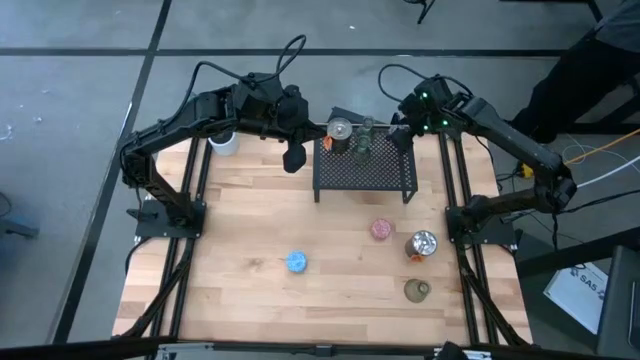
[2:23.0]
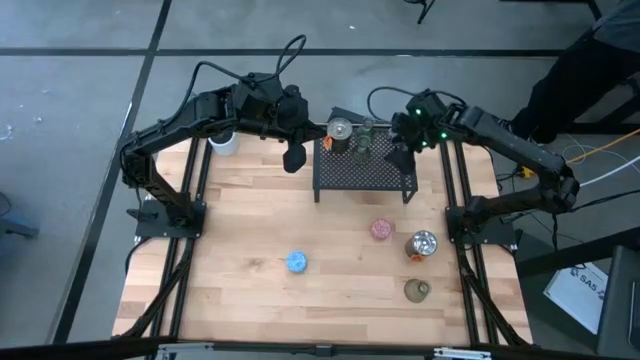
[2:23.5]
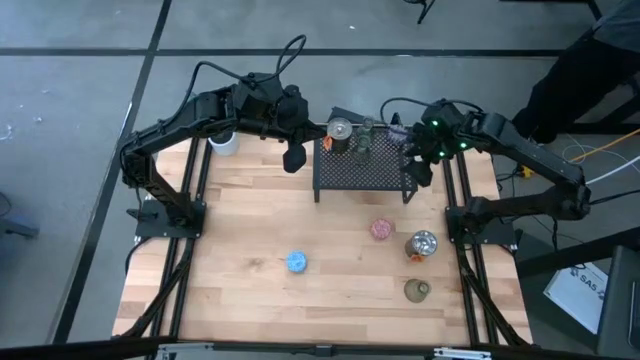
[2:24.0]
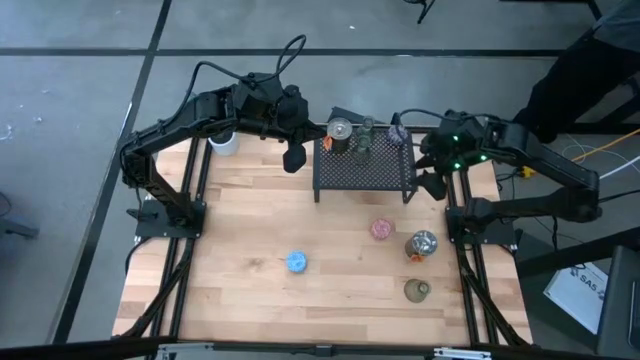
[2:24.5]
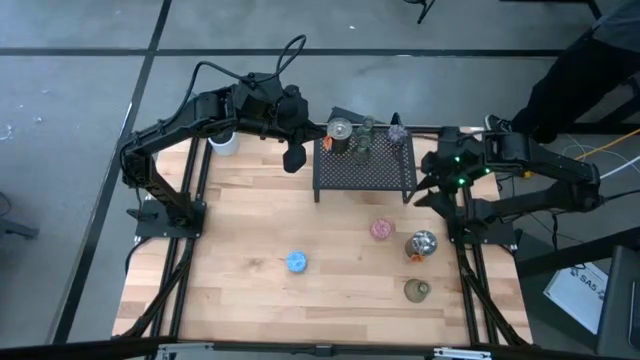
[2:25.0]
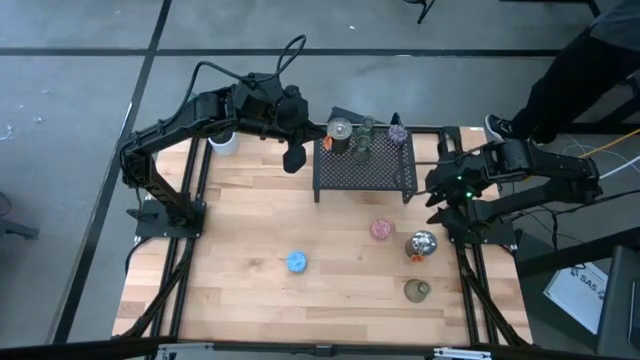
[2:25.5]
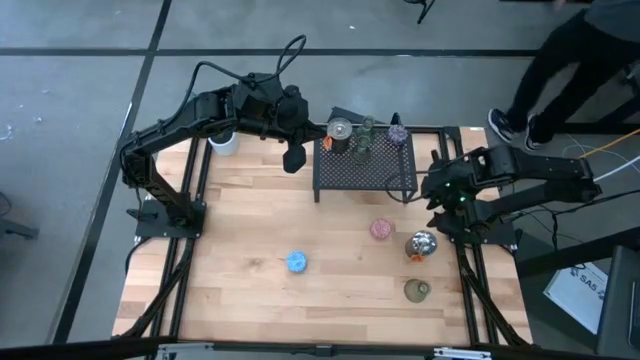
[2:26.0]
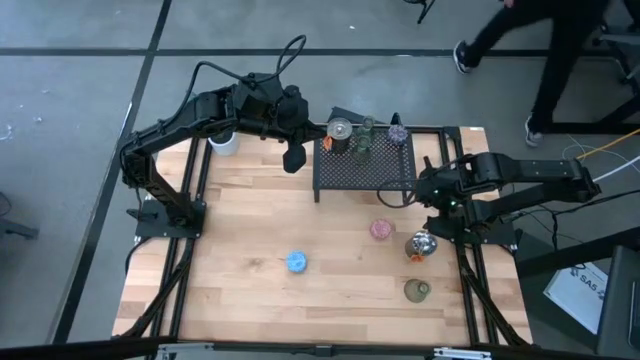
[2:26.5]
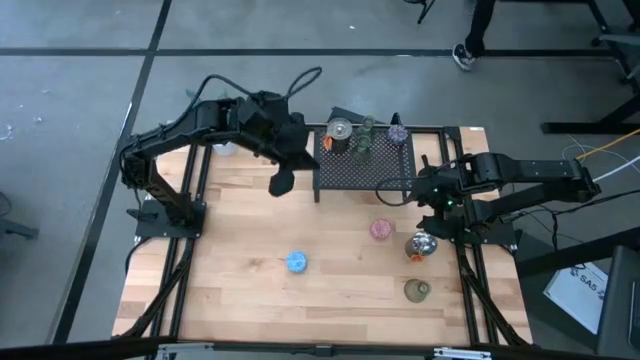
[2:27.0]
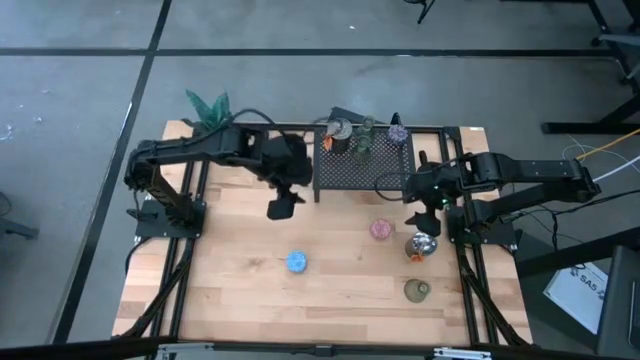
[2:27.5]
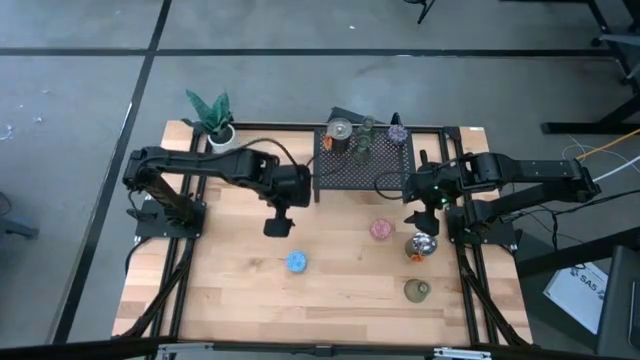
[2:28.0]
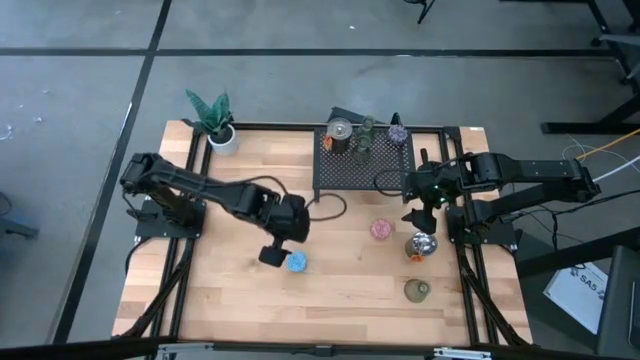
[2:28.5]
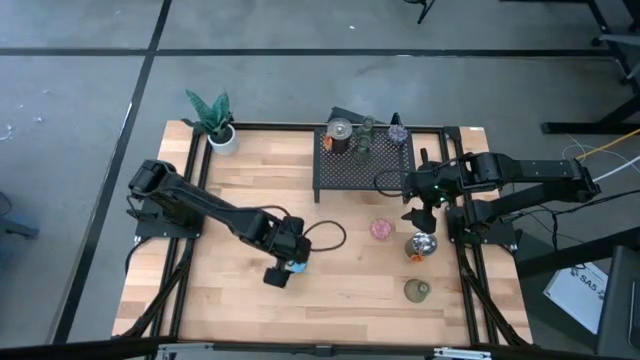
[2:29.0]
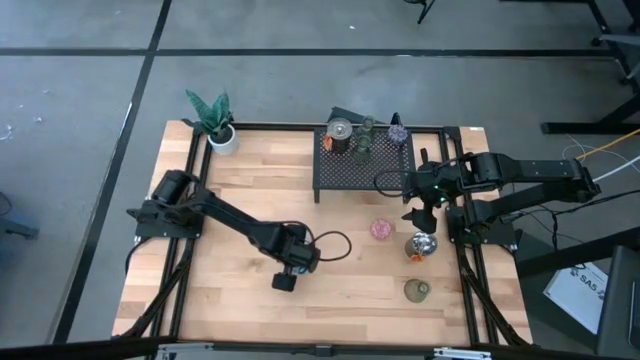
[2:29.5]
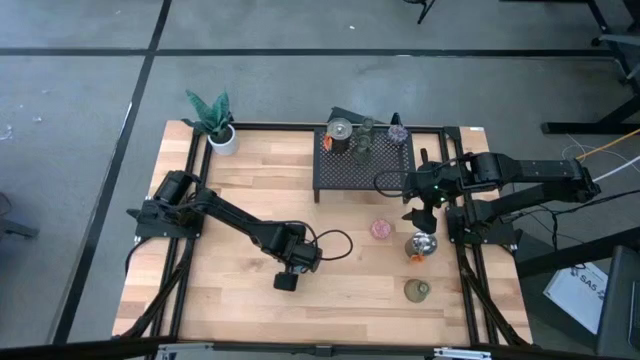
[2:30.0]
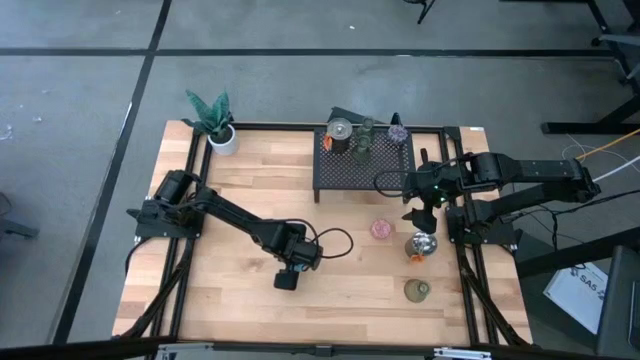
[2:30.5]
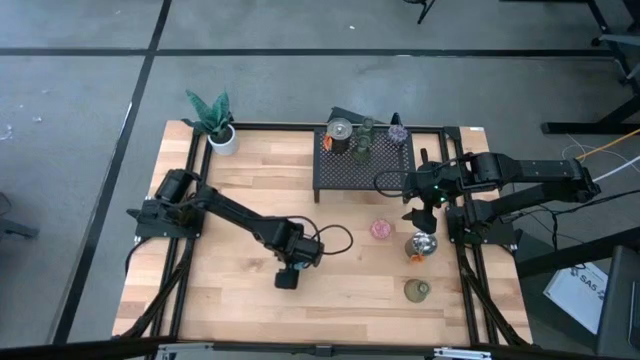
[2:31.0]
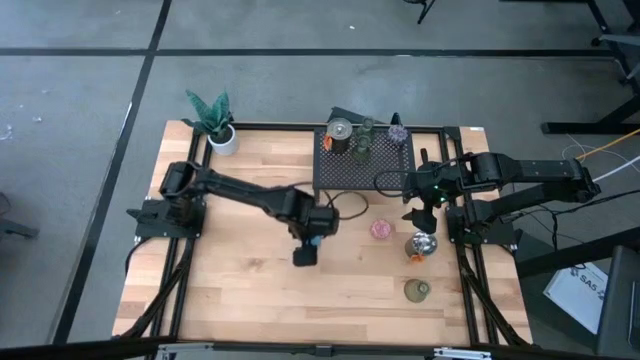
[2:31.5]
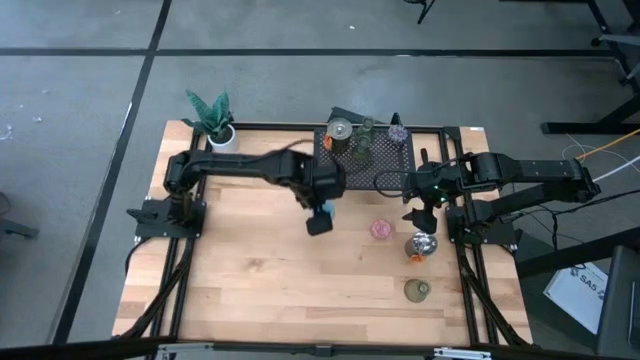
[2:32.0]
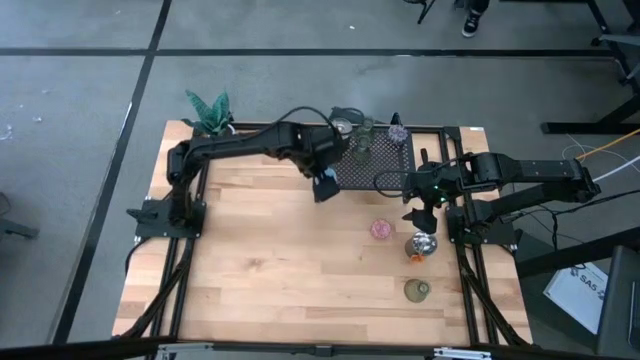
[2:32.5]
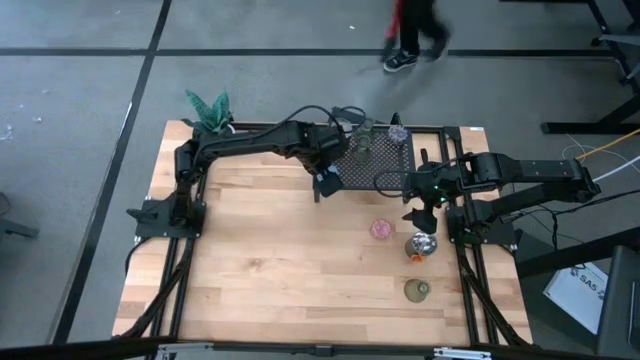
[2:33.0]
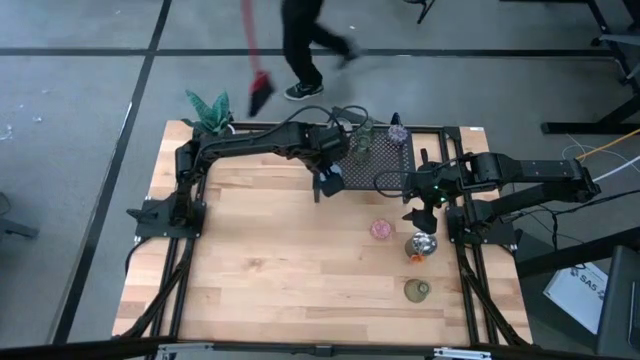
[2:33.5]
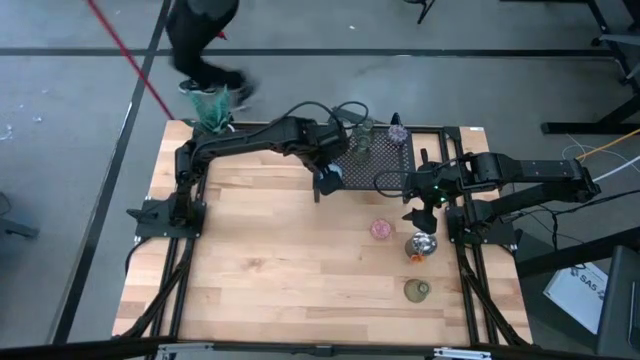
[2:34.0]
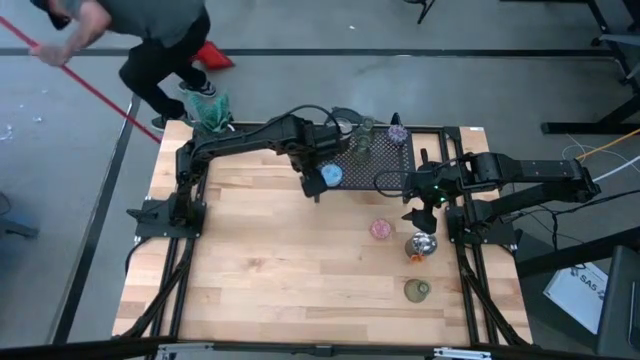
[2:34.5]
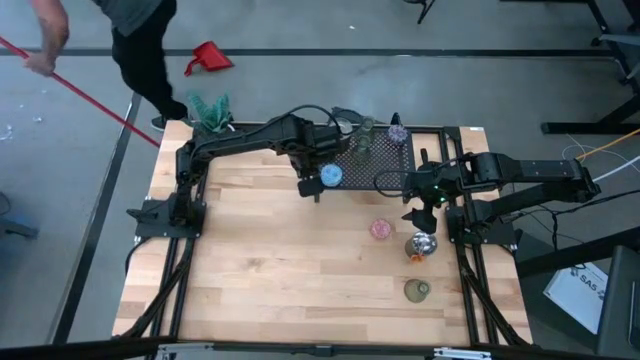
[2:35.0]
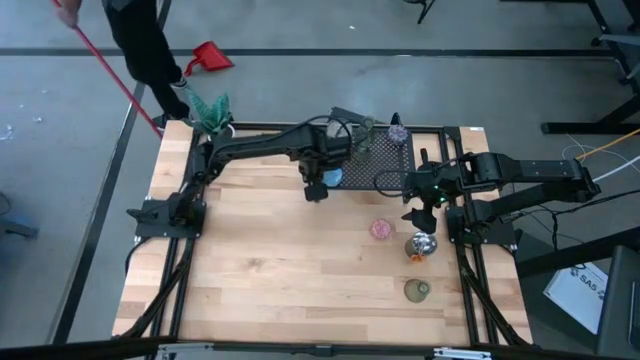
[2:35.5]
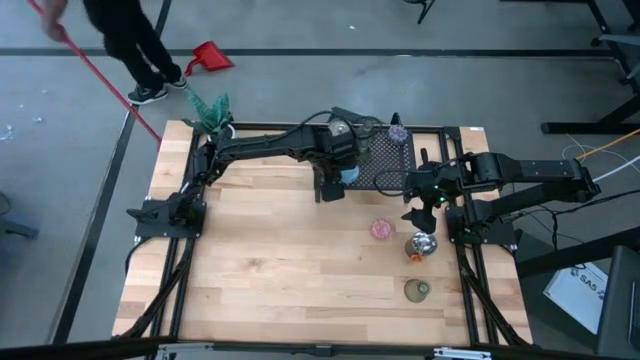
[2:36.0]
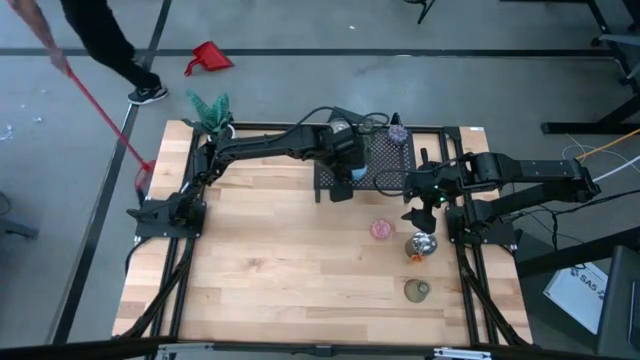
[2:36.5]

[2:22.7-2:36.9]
Task: Pick & Place candle stick holders
Put the blue scented candle on the shelf align with the red scented candle

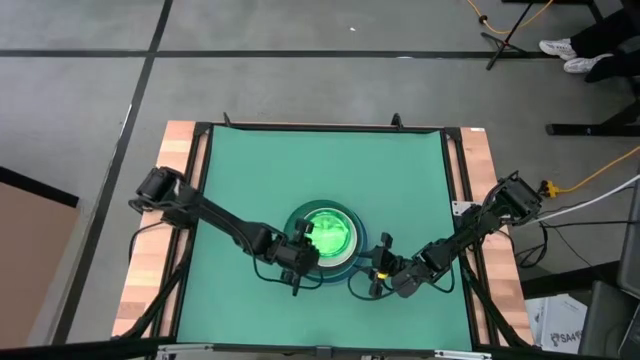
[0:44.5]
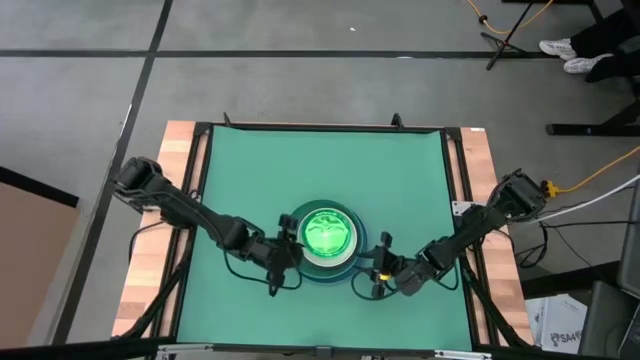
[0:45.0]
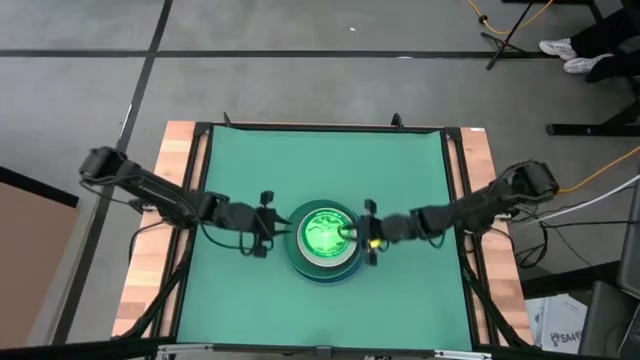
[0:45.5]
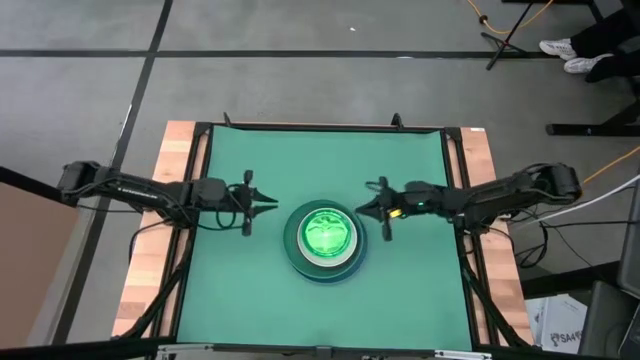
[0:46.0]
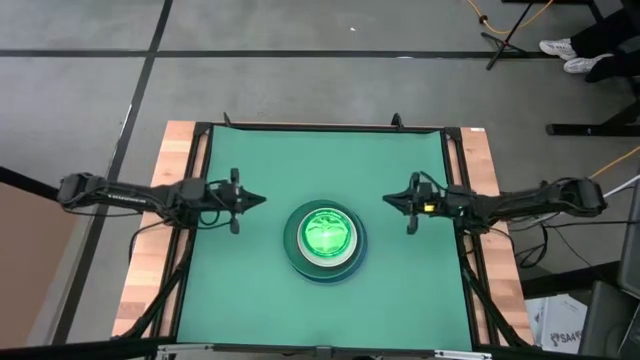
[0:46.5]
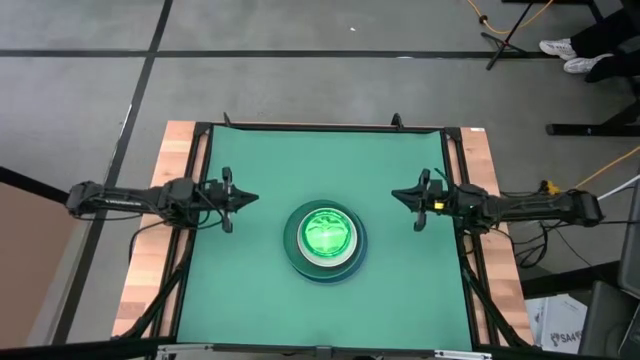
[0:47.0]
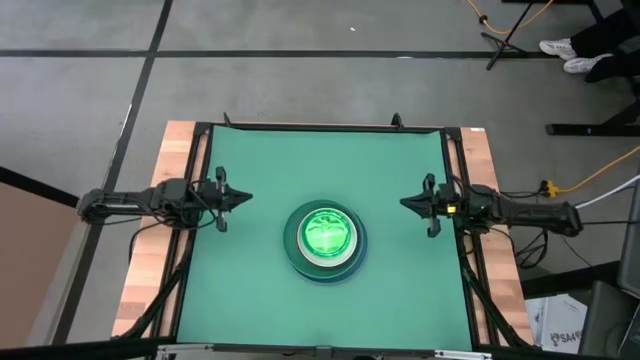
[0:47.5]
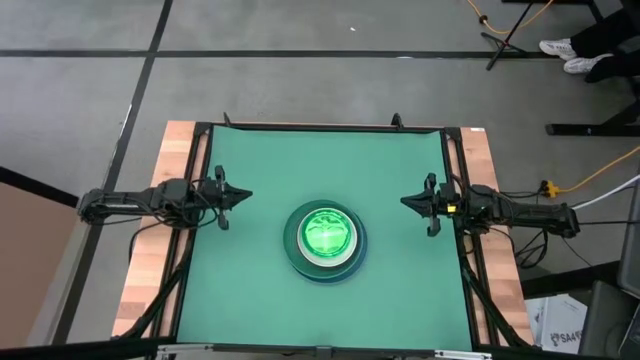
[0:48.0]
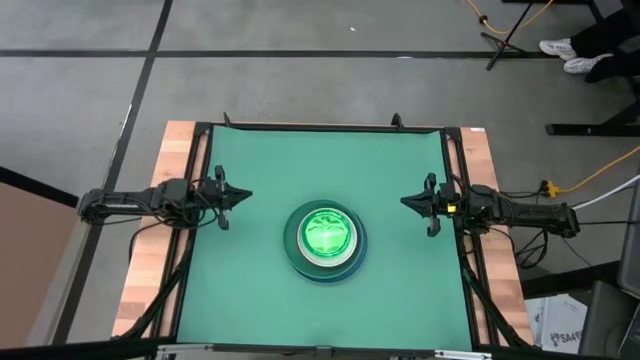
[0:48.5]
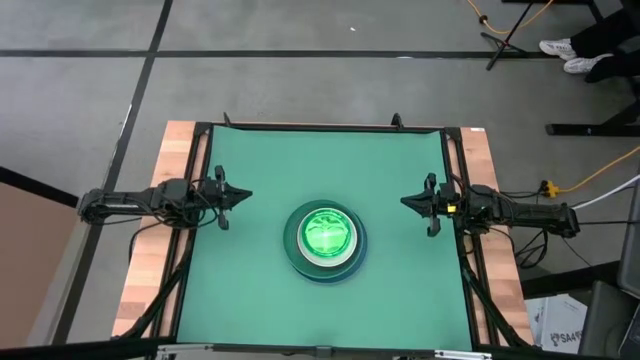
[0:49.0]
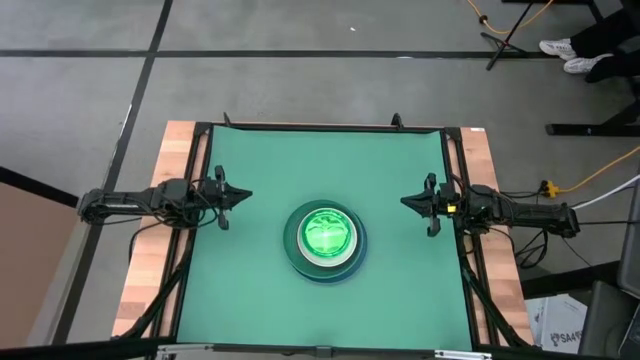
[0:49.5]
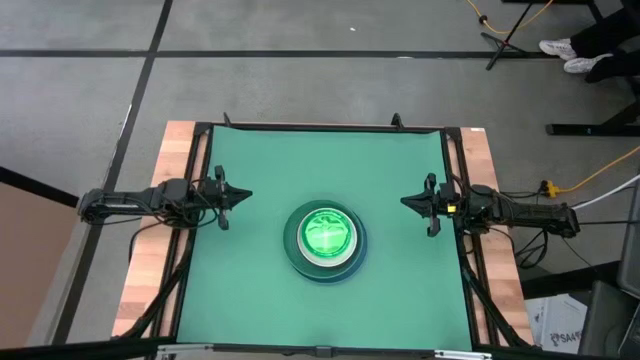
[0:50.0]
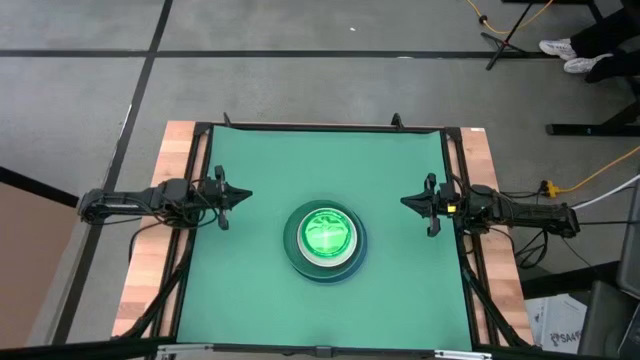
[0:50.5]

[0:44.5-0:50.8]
Task: Stack plastic plates
Return to Home Position

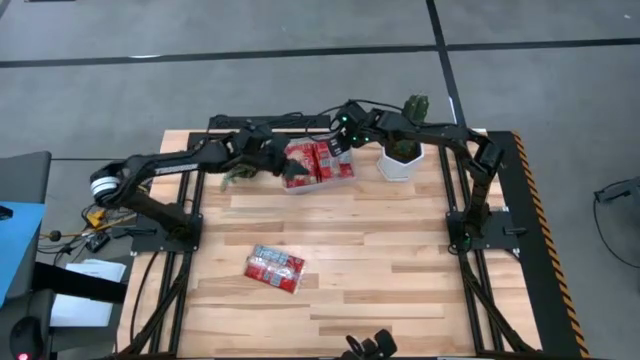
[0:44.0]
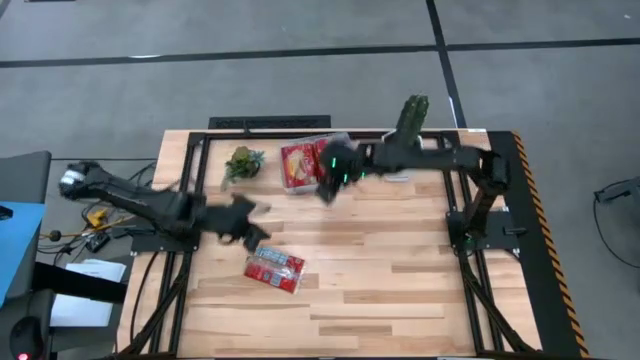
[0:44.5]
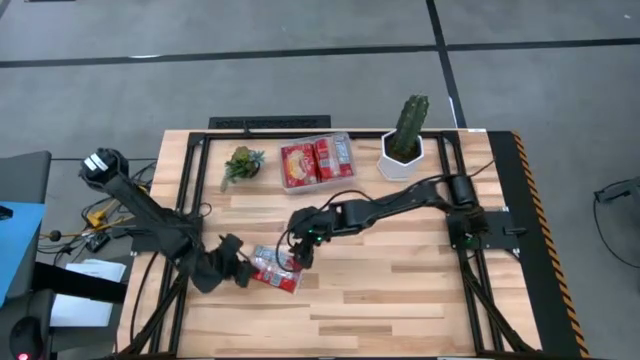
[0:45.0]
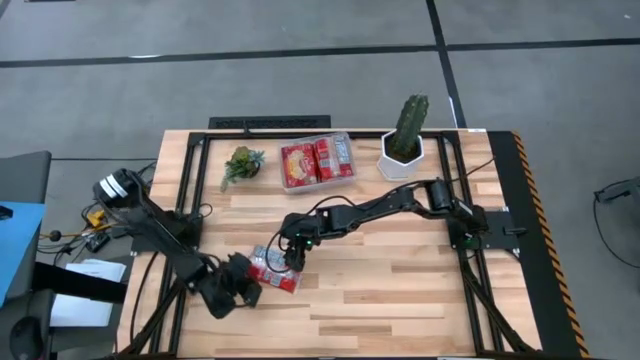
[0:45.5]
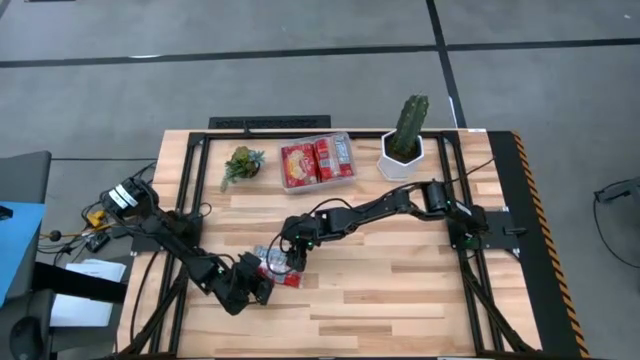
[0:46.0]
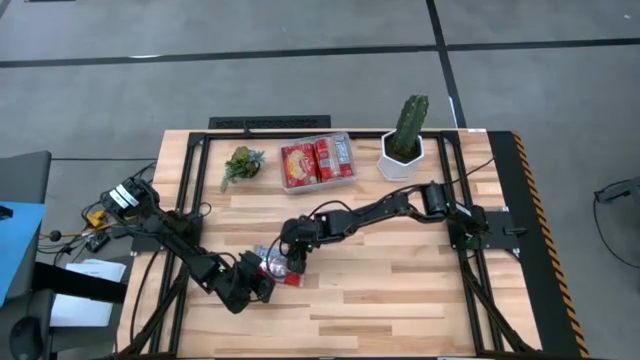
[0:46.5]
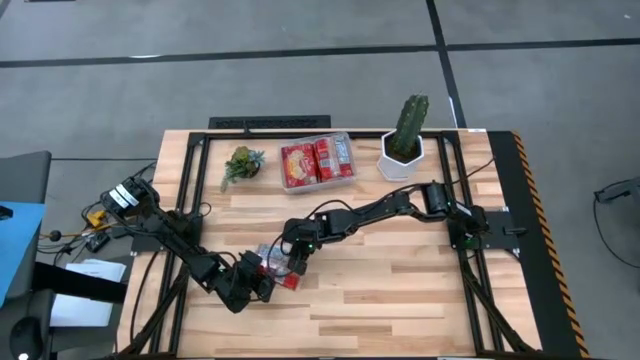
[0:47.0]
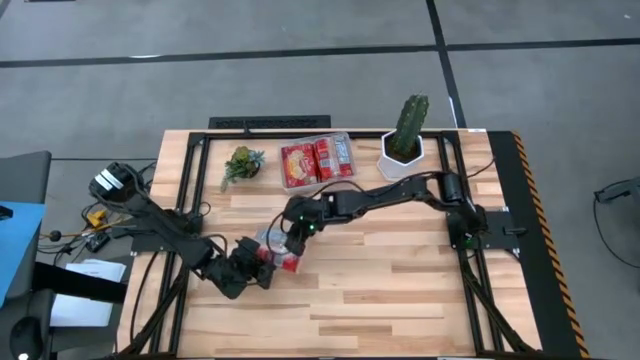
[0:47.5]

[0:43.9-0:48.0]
Task: Sort popcorn bags into baskets
Put the red popcorn bag into the transparent bin
